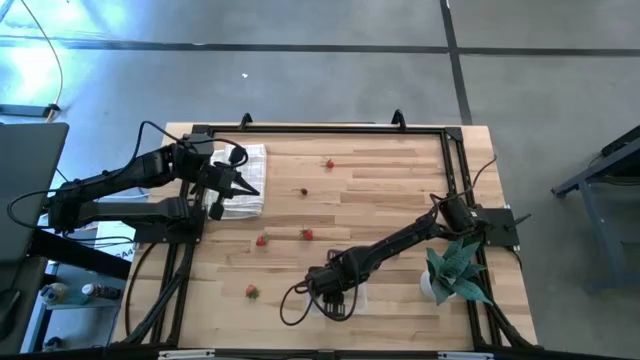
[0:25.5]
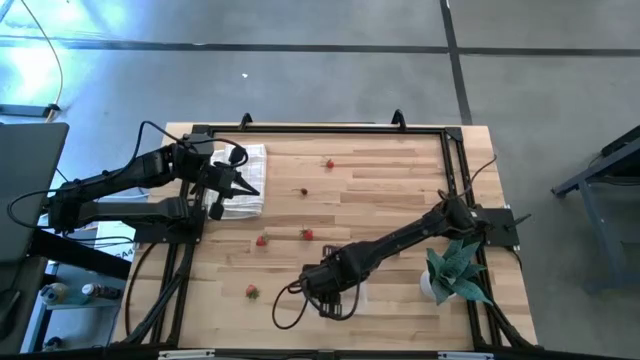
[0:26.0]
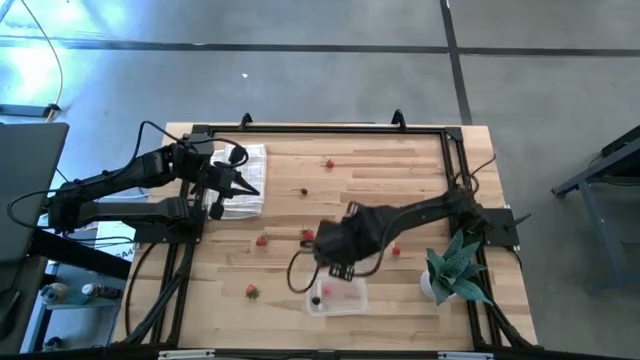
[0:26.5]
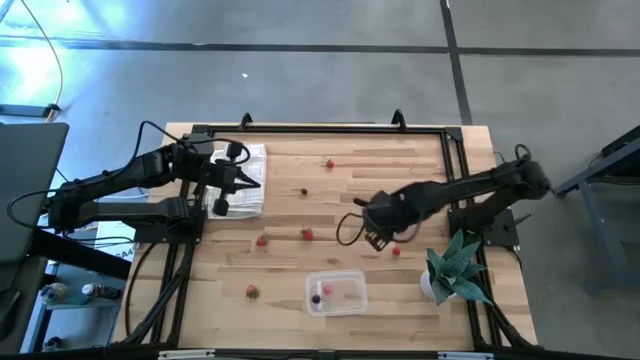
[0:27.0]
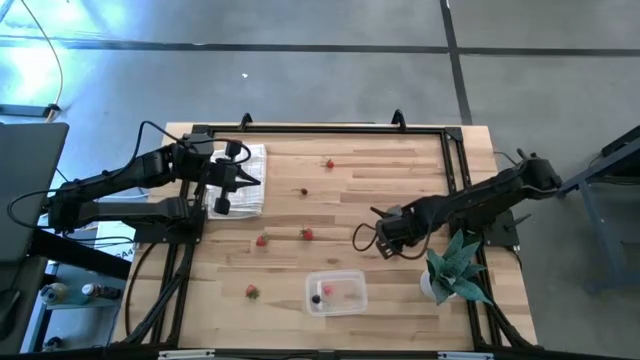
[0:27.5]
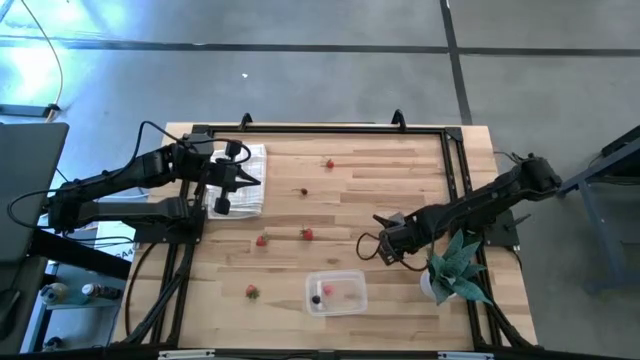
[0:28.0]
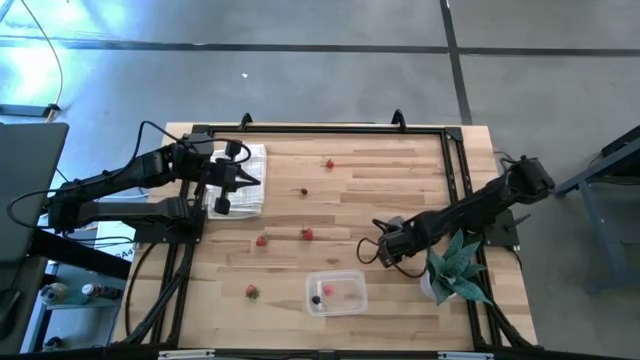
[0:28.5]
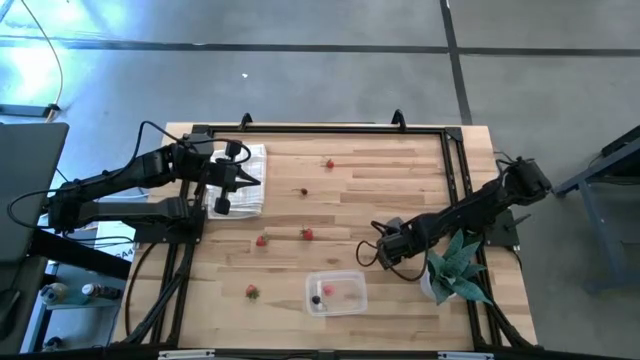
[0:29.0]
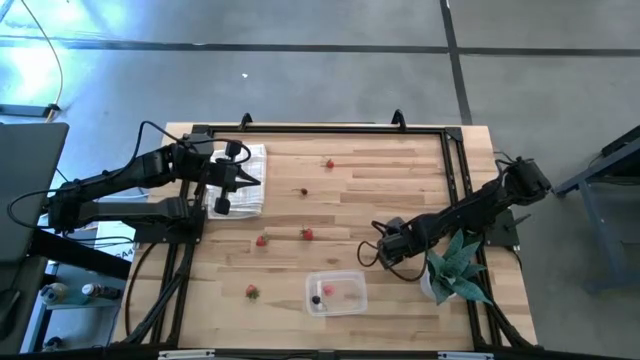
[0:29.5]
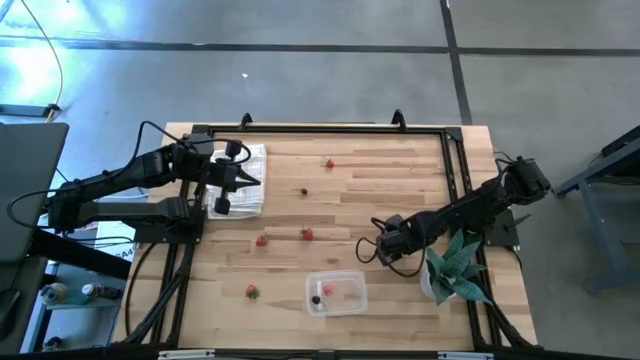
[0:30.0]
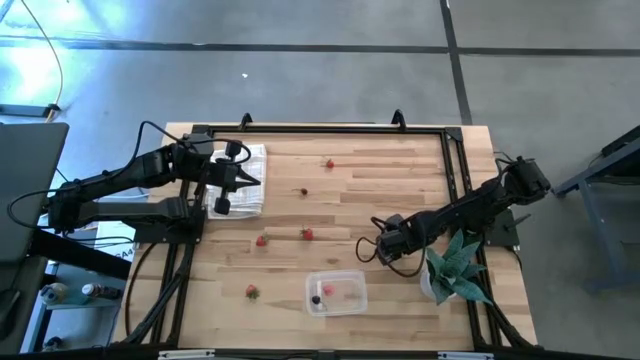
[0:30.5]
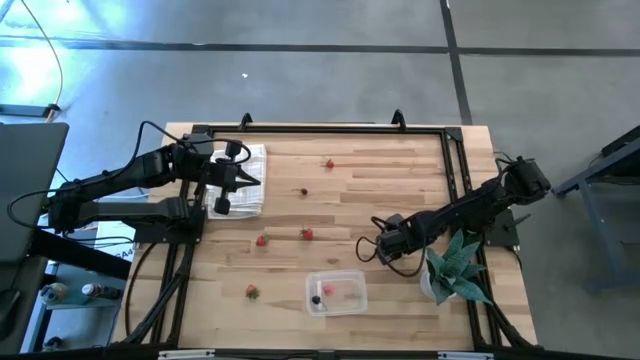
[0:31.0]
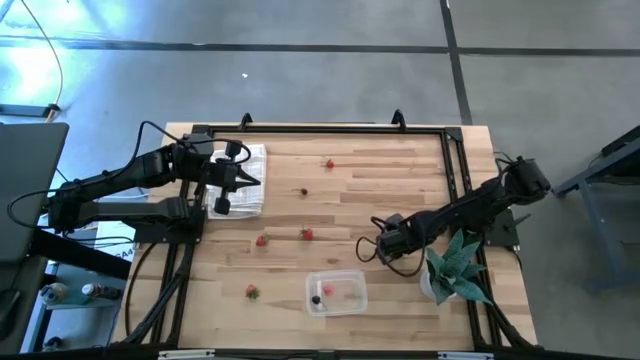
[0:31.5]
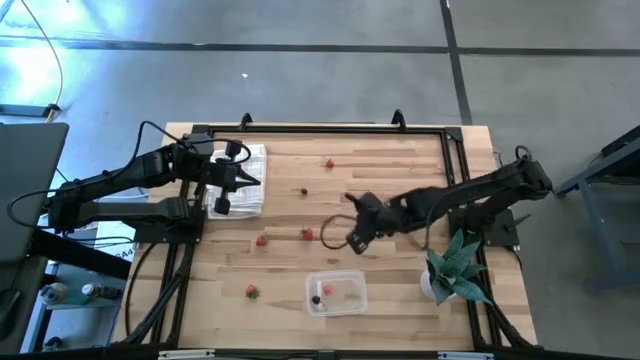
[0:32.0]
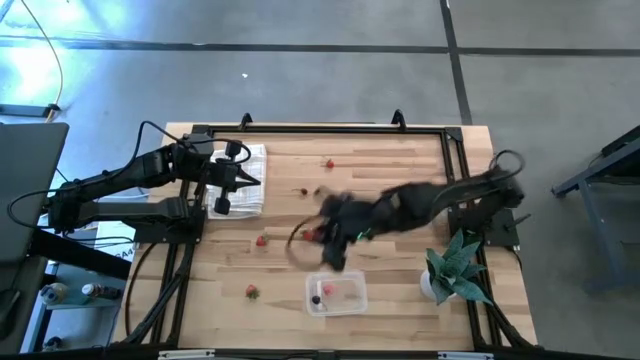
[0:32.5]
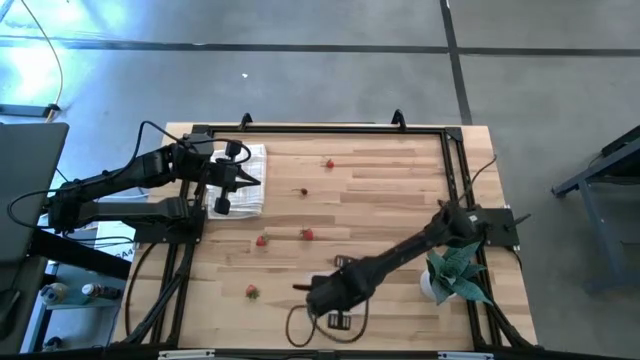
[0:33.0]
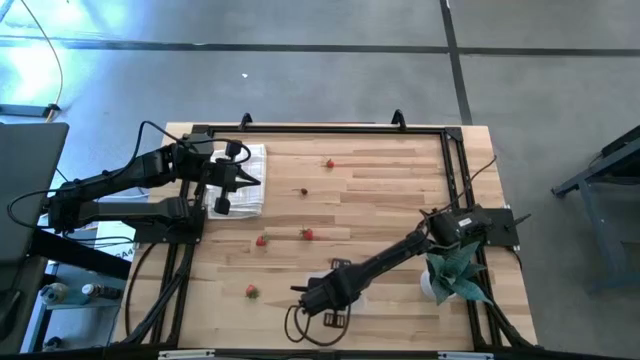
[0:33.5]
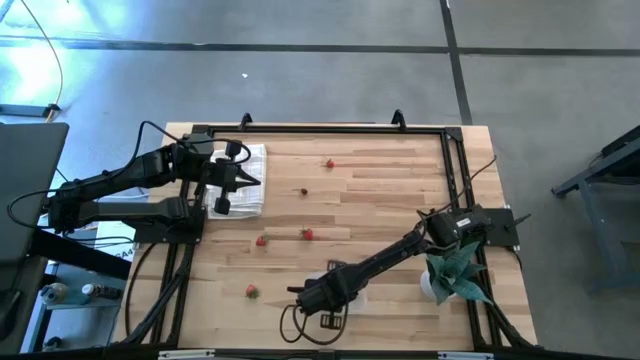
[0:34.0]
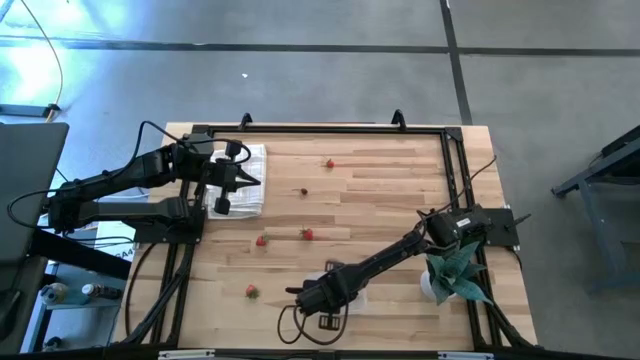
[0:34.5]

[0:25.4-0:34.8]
Task: Pick and placing Produce into tupperware
Put the red raspberry into the transparent bin

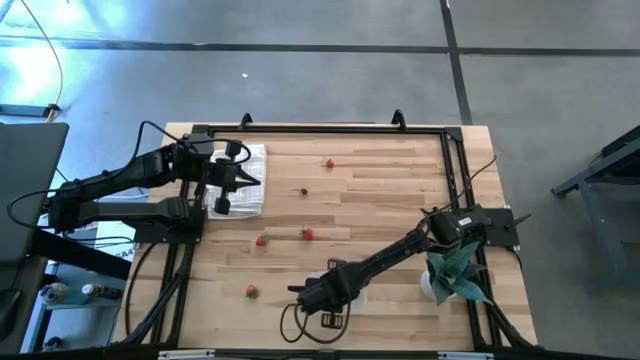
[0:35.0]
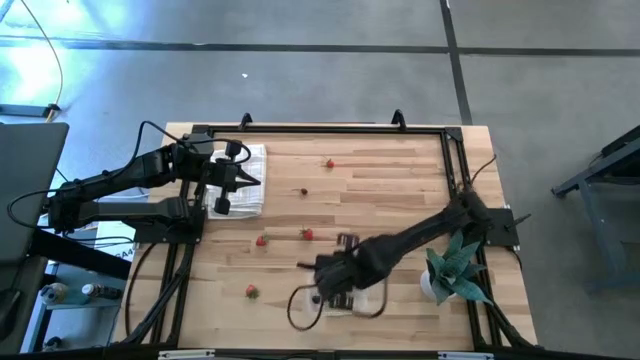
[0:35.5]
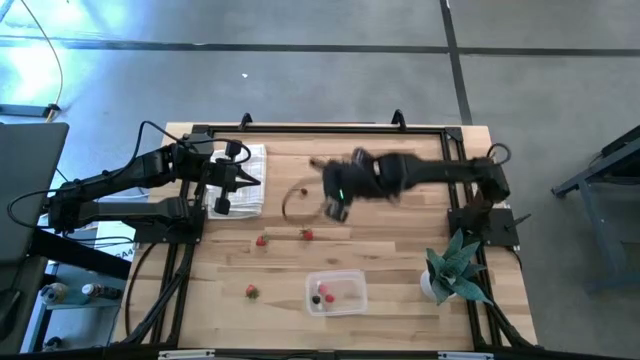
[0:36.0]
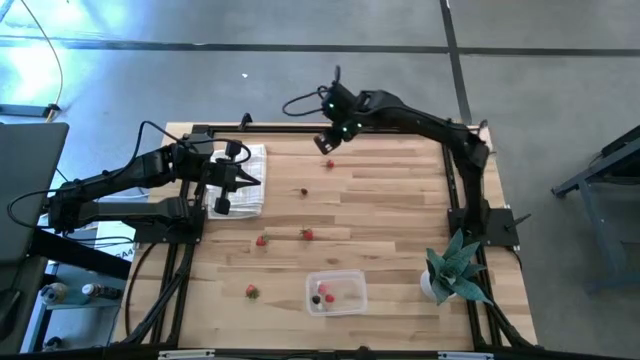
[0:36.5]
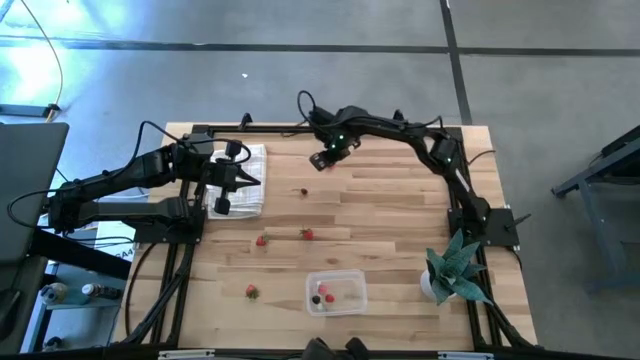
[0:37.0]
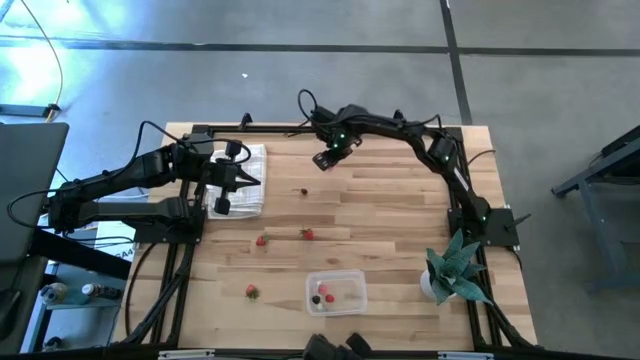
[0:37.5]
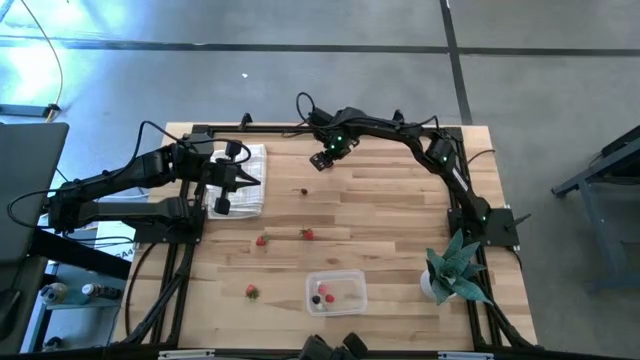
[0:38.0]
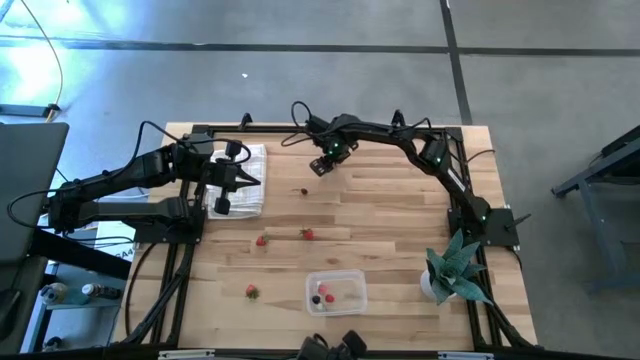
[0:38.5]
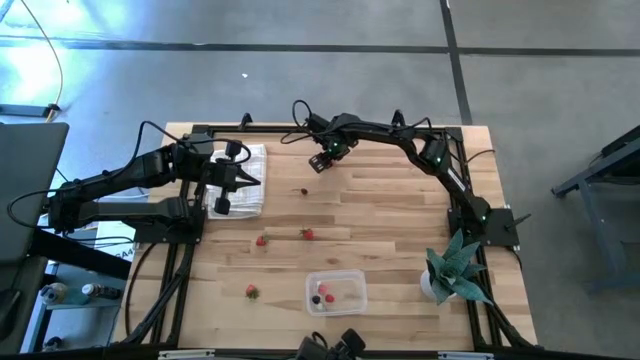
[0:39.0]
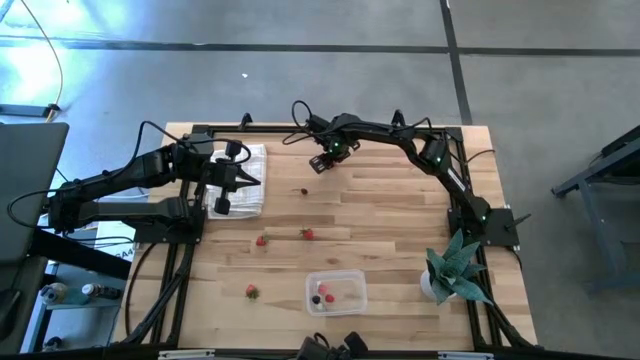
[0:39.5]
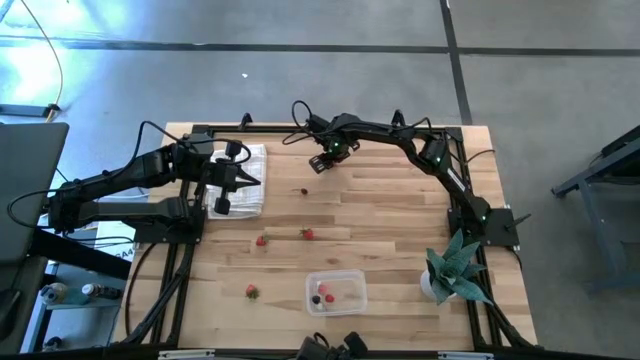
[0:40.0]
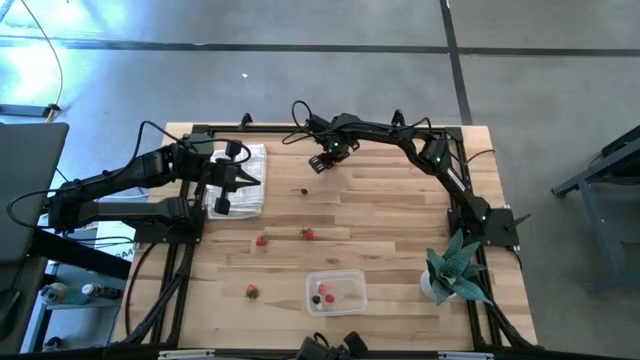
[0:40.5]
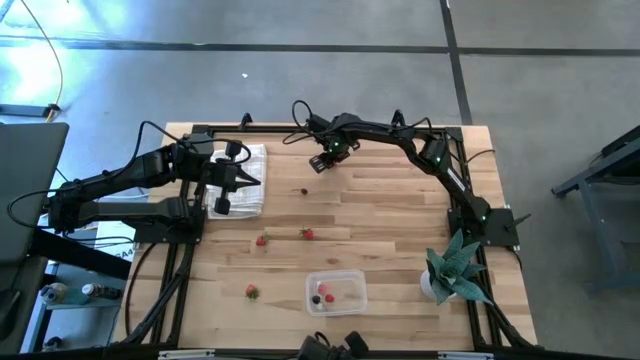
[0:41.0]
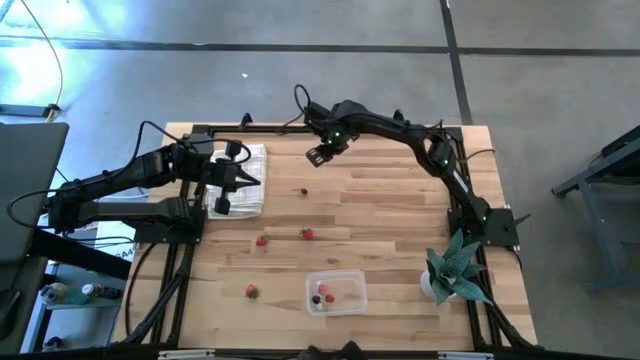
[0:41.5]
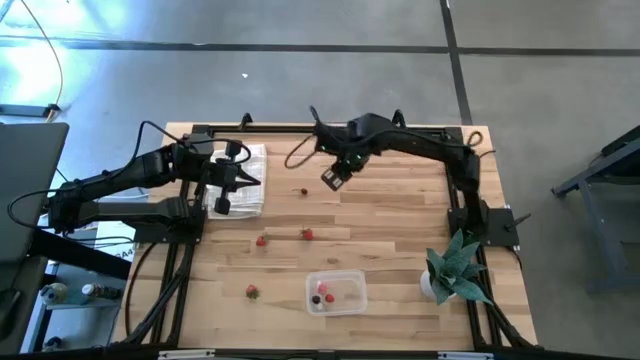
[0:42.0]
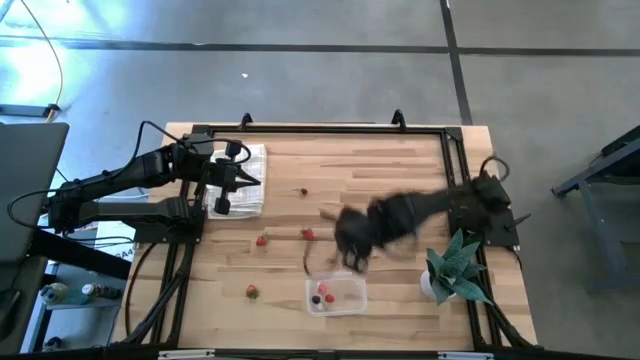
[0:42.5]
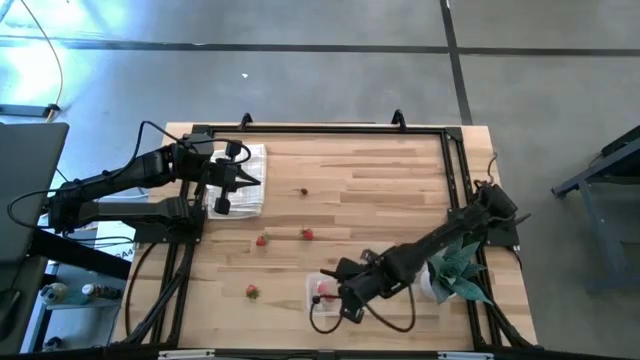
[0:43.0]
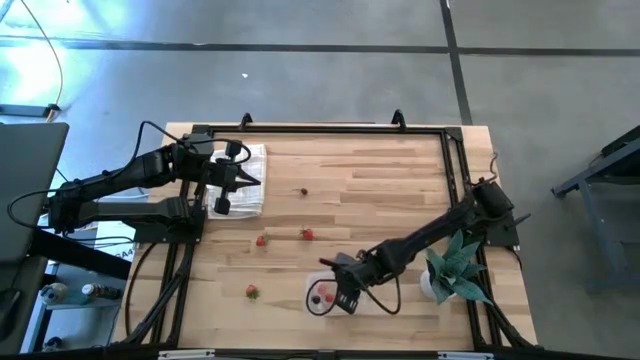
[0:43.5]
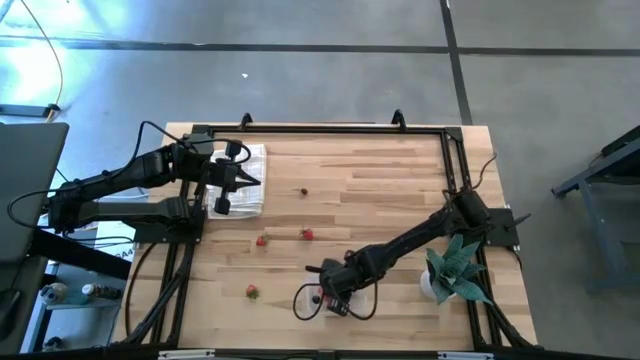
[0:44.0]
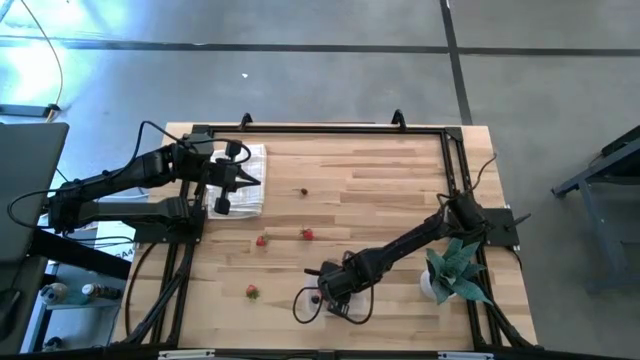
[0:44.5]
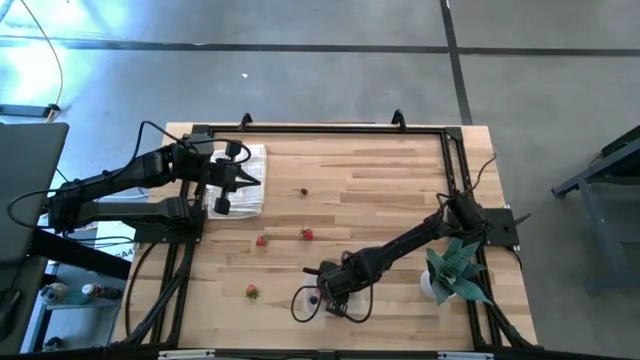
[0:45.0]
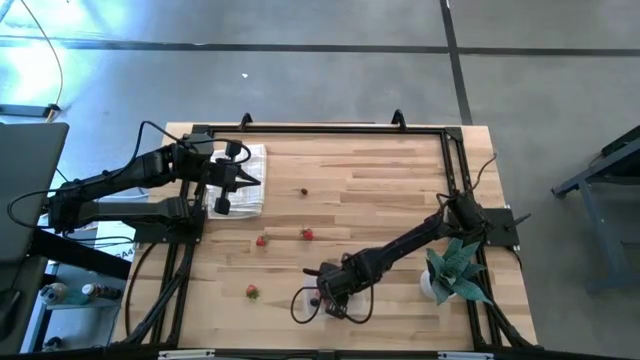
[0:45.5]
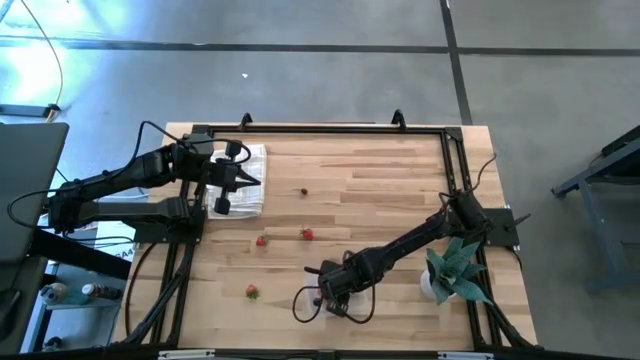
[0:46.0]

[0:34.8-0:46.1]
Put the red strawberry into the transparent bin

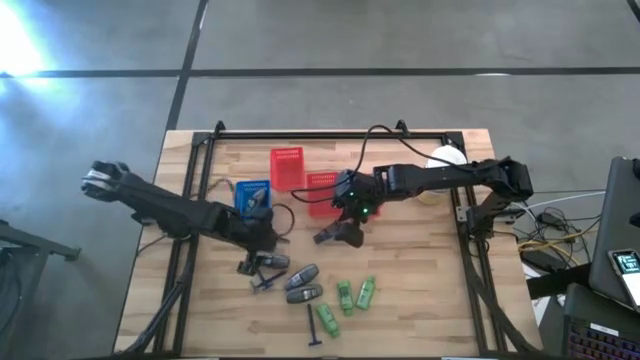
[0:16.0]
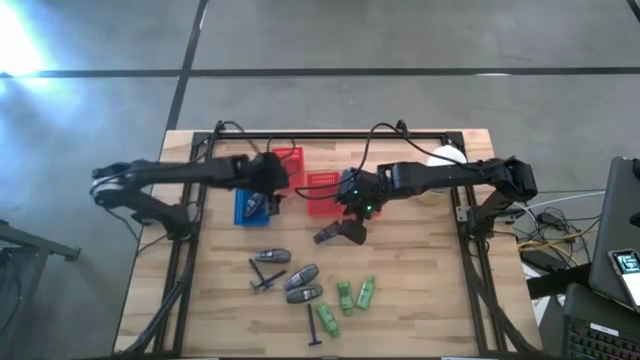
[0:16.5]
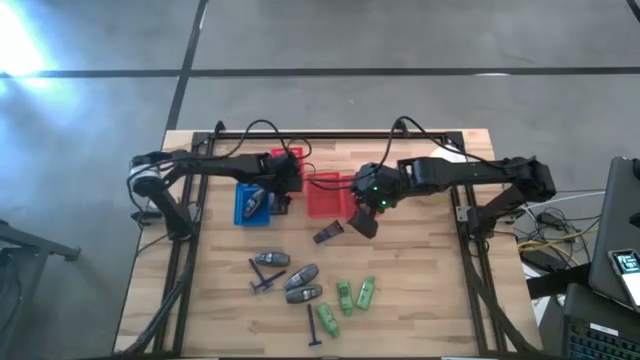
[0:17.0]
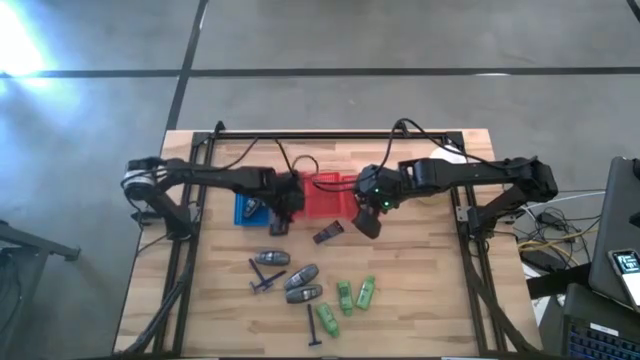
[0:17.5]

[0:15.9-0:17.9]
Task: Pick & Place Travel size toiletries
Adjust the left red bin
